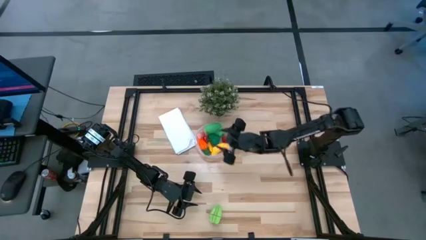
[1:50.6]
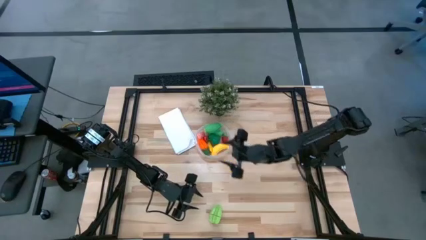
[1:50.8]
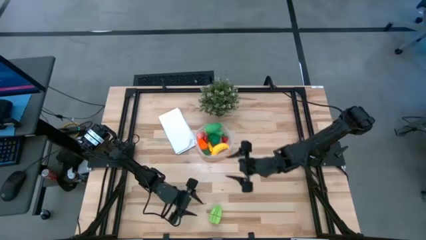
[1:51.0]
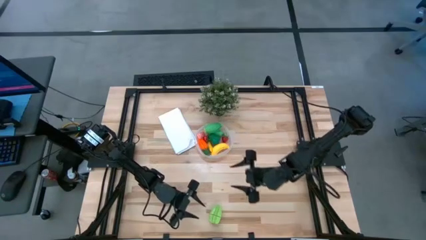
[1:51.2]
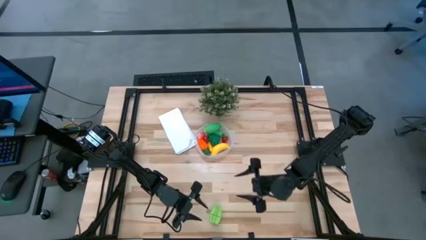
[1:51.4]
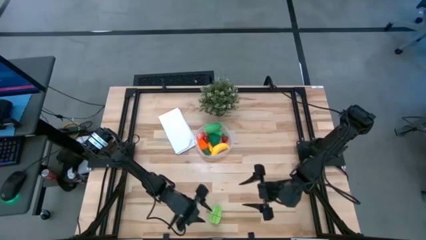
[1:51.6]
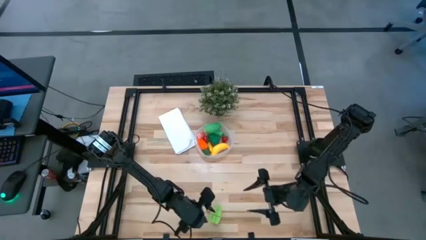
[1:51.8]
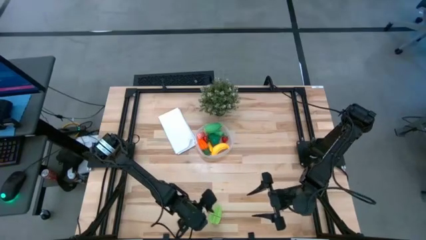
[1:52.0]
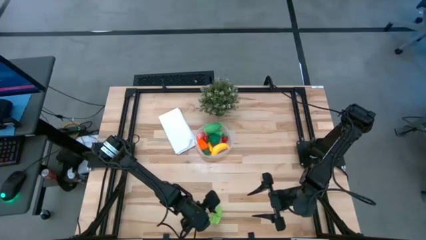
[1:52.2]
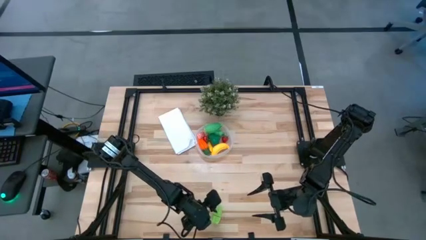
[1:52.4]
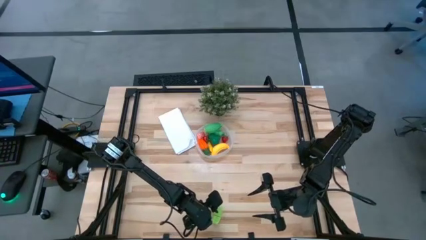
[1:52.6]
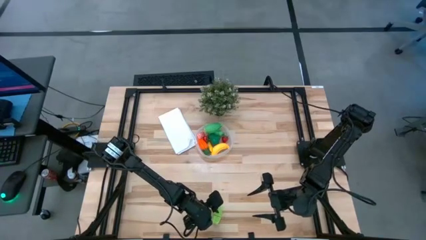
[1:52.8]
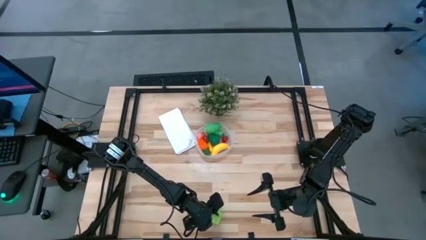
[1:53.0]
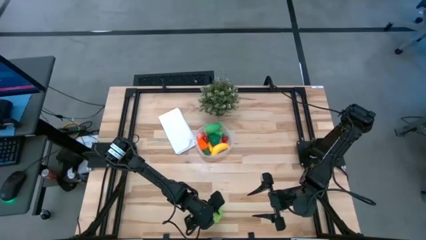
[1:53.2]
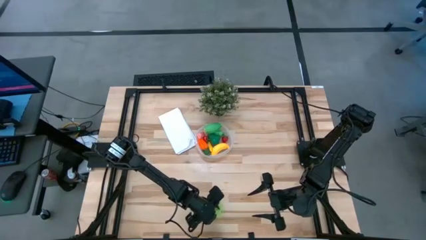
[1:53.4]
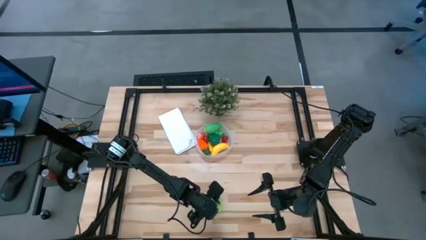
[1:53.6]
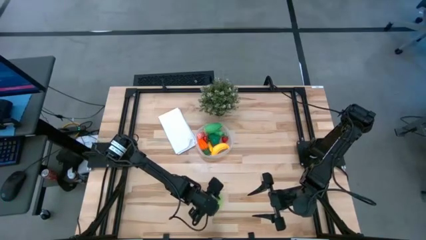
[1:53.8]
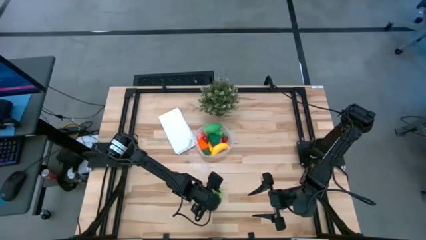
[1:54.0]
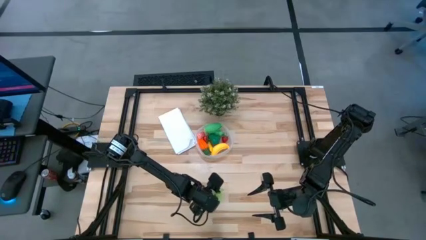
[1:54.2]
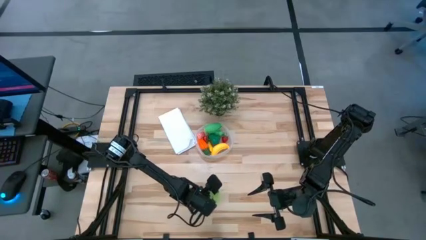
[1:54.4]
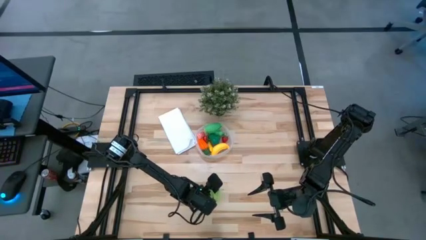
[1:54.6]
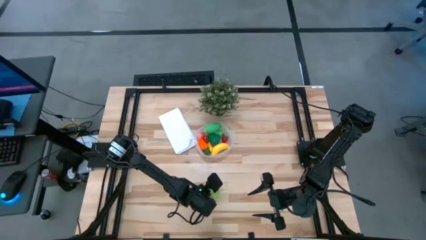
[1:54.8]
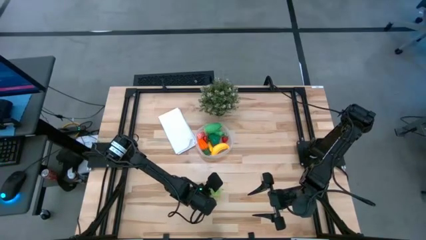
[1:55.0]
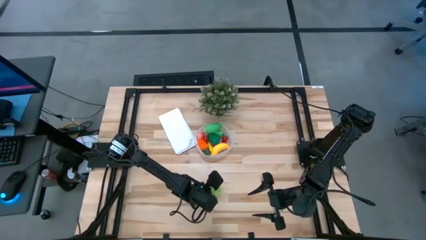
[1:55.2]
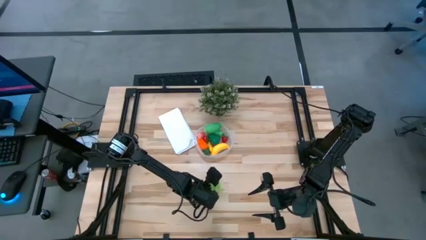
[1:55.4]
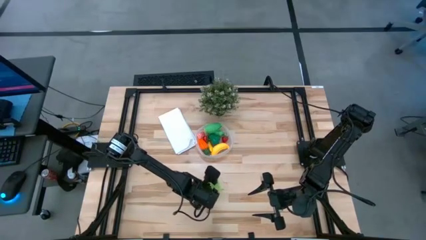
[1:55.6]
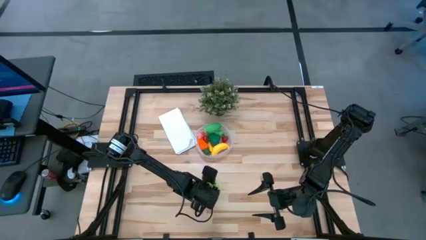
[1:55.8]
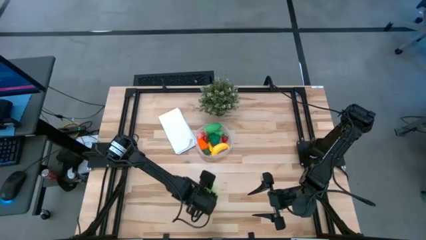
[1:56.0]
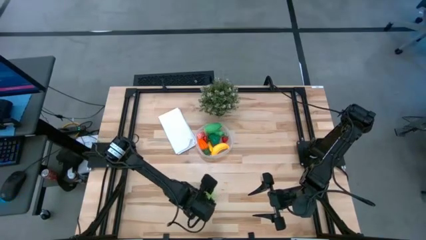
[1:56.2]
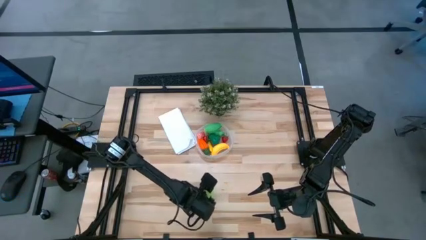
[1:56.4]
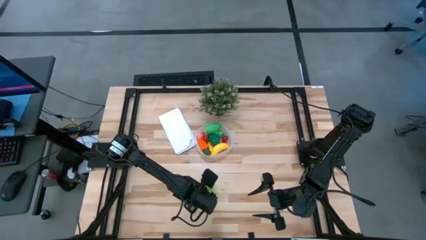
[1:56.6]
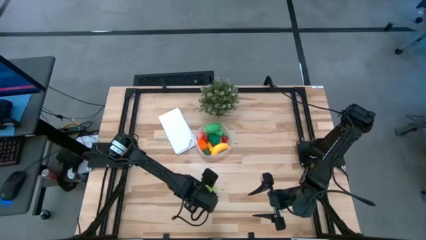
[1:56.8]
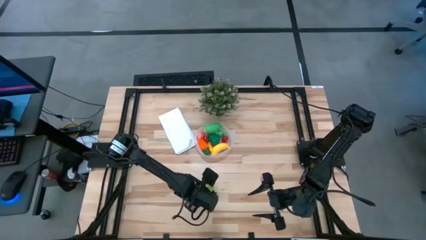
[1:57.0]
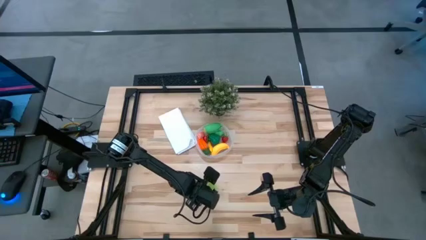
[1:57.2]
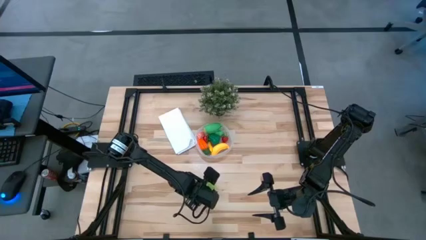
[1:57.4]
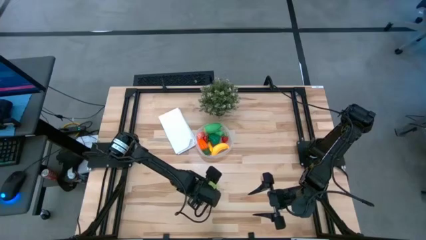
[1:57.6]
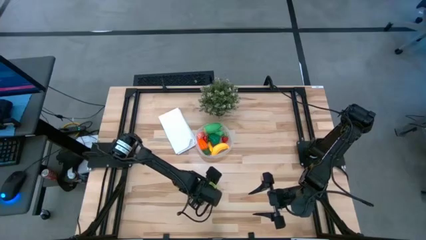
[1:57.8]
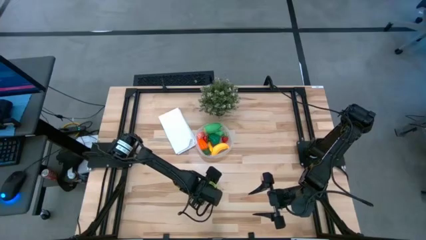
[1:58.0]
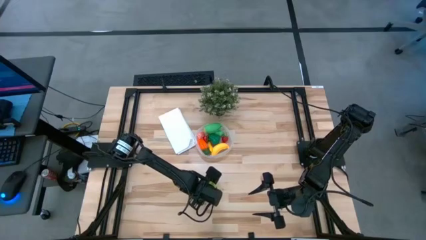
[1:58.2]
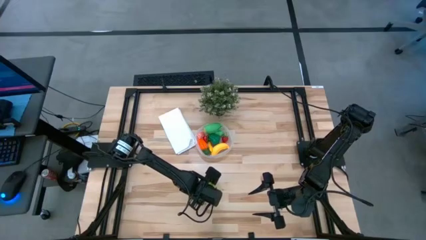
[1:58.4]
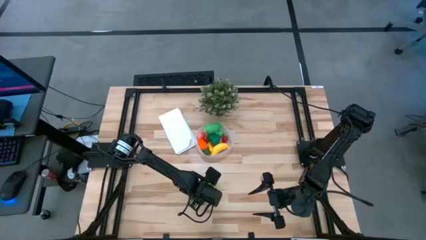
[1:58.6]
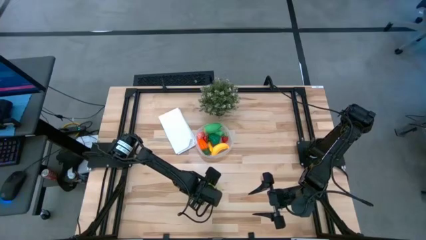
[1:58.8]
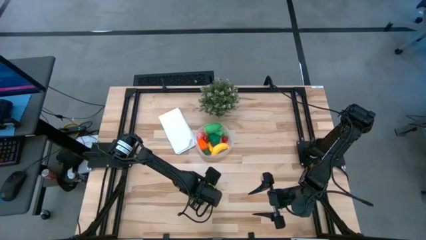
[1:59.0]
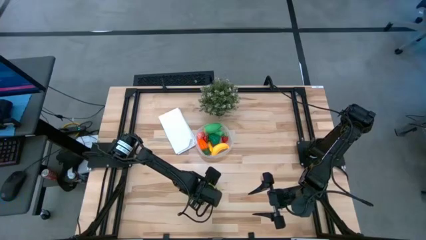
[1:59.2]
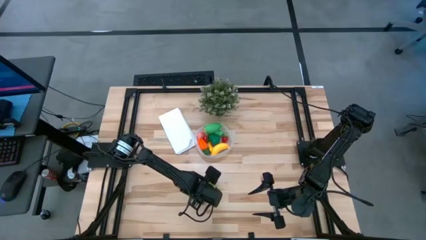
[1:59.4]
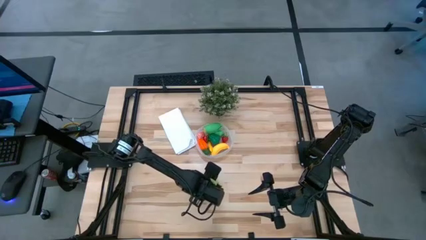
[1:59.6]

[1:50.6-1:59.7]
Task: Pick and placing Produce into tupperware
Put the green star apple into the transparent bin

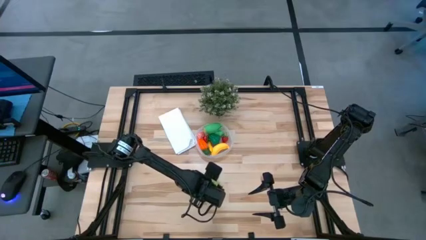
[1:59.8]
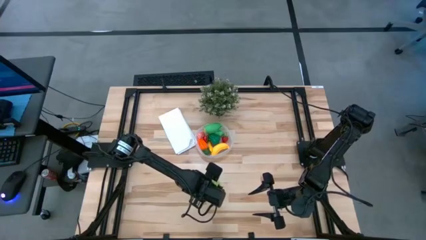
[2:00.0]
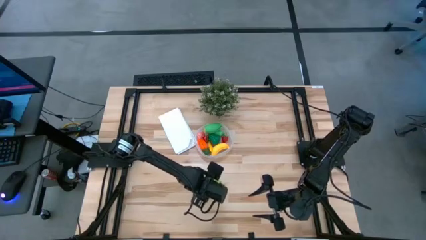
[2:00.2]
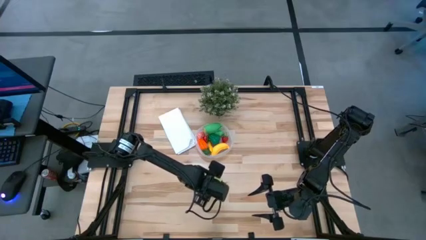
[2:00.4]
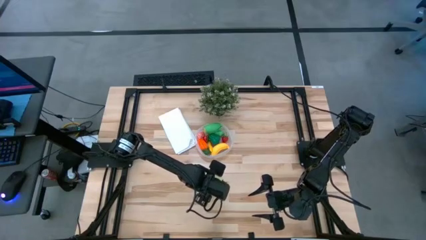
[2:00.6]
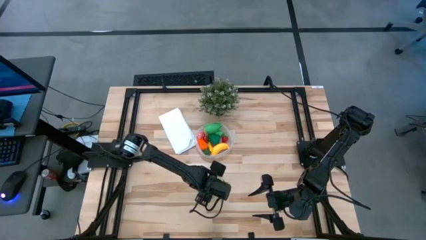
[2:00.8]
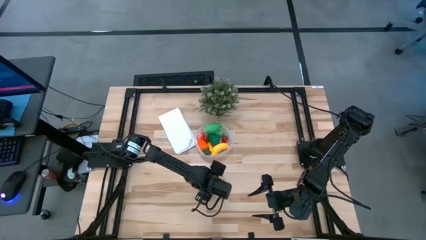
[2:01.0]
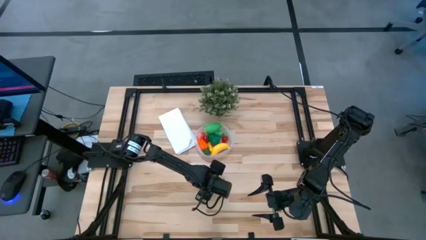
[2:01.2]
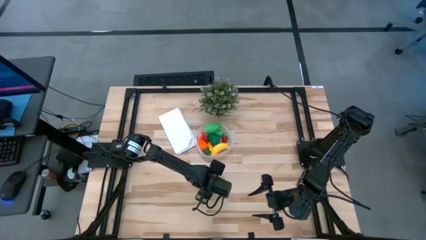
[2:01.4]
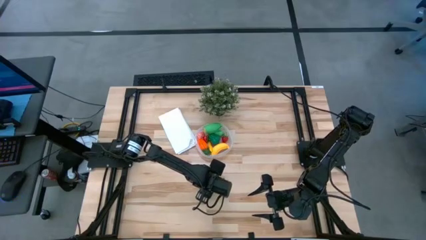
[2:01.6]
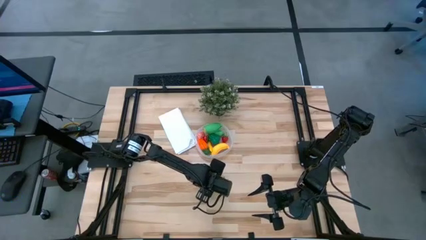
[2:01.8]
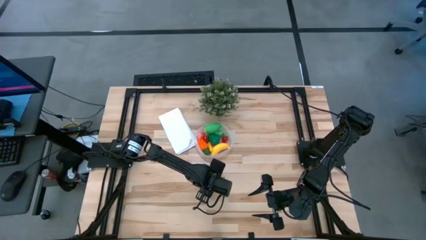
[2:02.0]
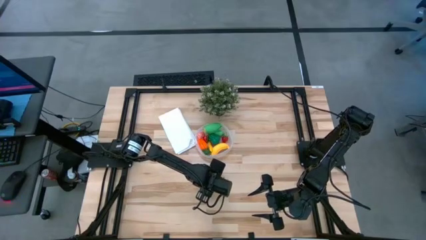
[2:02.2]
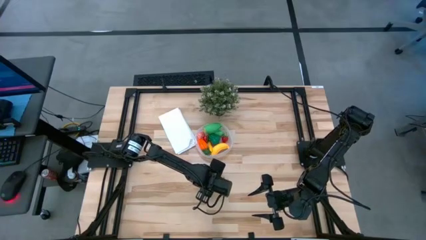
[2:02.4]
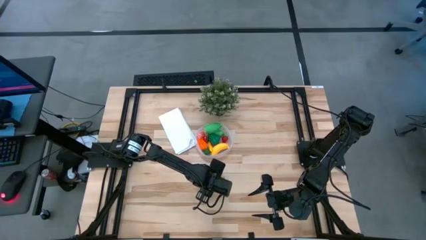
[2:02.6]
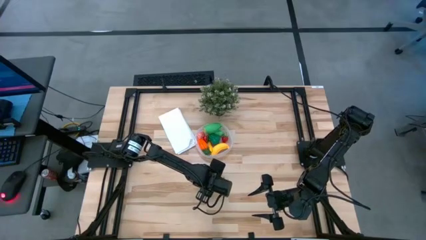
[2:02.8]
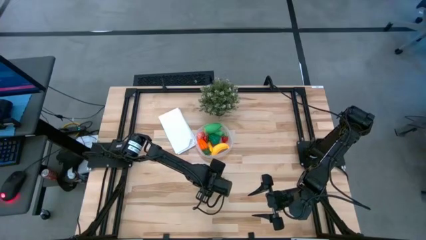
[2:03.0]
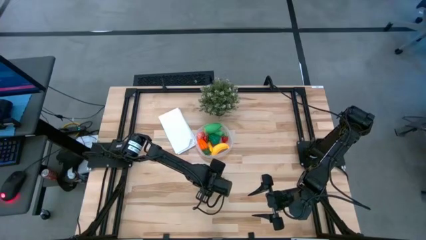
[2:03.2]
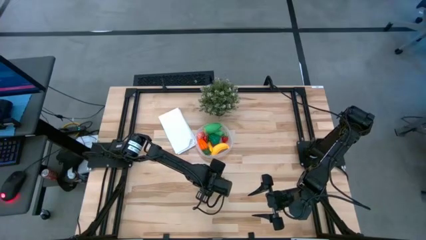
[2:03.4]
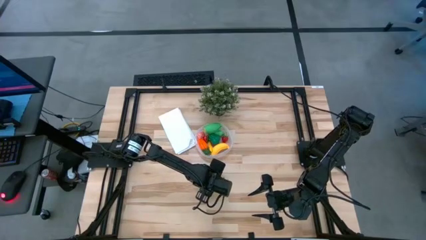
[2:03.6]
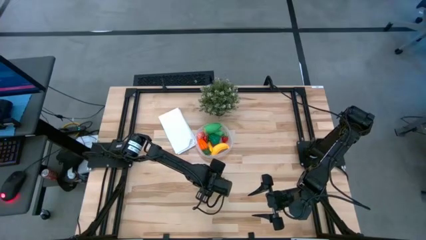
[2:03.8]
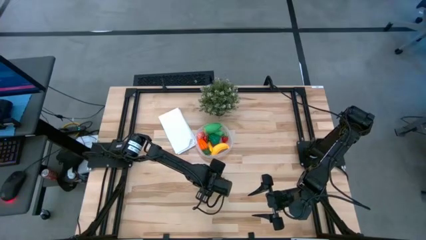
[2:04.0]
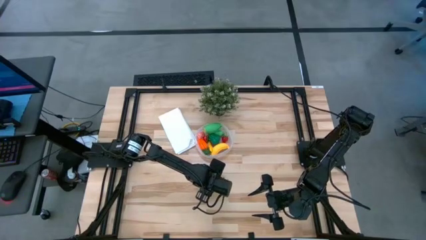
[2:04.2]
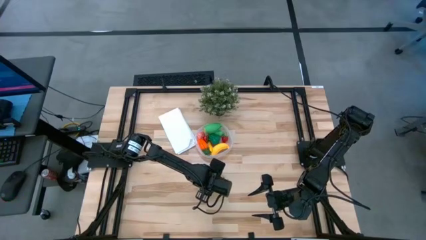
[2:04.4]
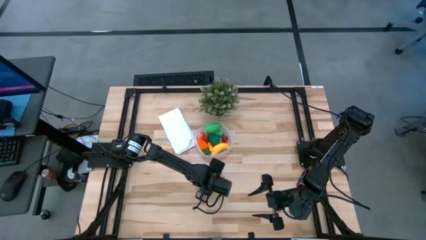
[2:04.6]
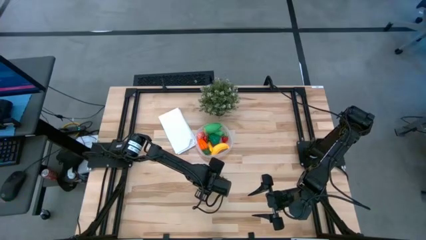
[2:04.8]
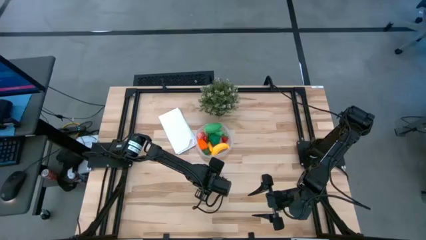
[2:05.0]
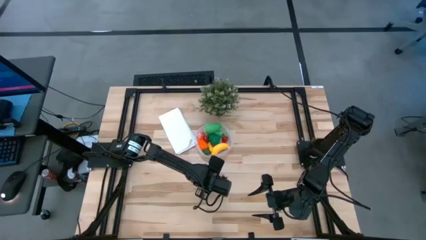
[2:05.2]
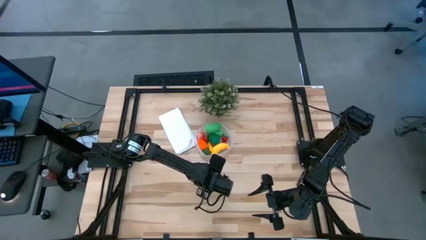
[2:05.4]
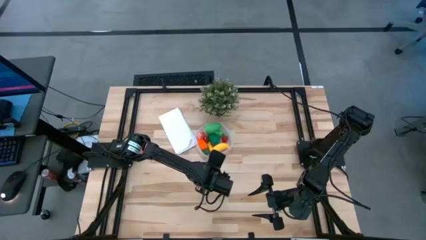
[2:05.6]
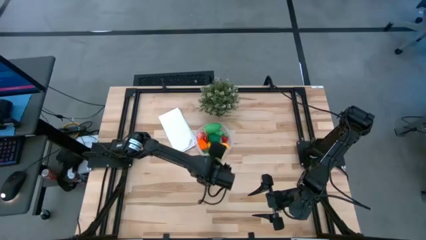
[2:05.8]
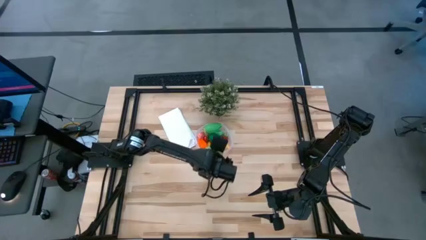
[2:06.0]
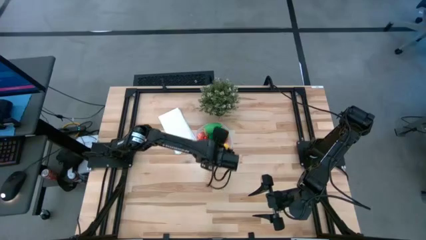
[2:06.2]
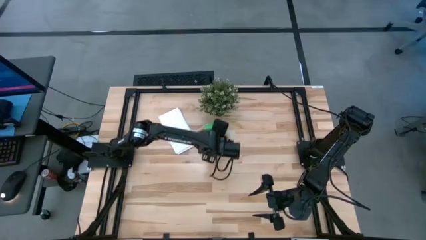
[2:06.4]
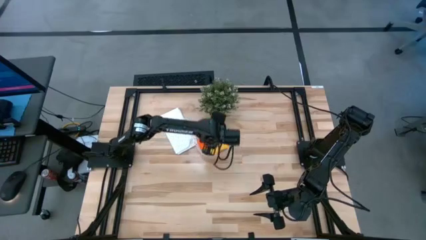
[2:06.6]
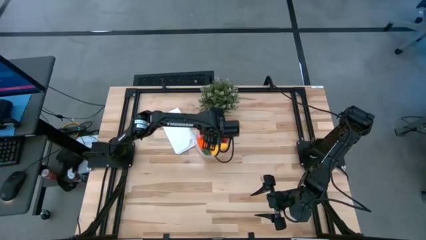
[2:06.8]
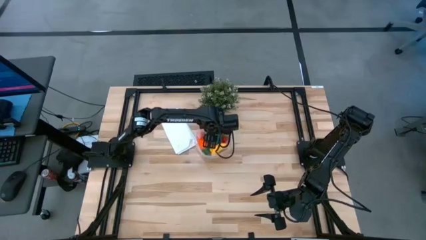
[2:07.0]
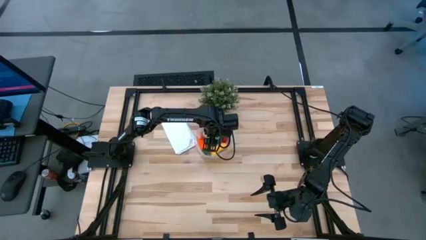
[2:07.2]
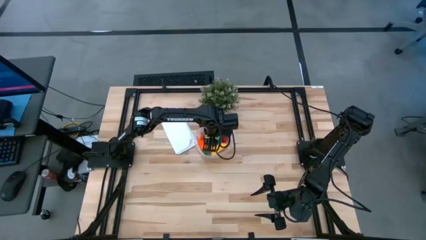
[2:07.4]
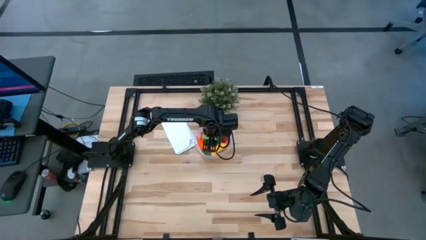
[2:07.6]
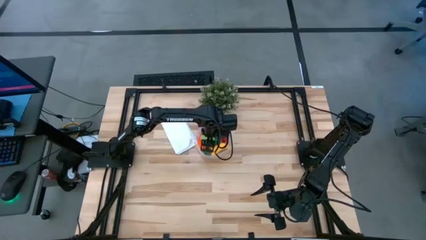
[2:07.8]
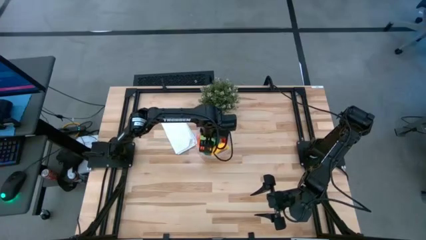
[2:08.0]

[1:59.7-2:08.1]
Put the green star apple into the transparent bin
